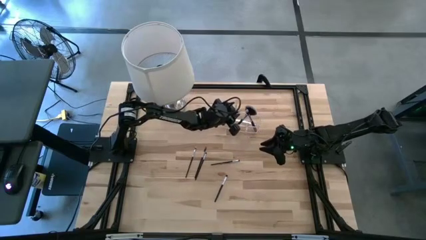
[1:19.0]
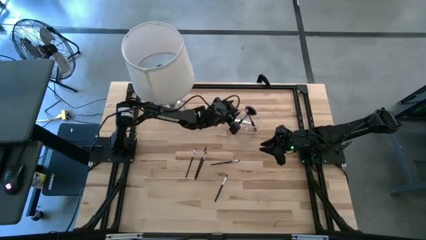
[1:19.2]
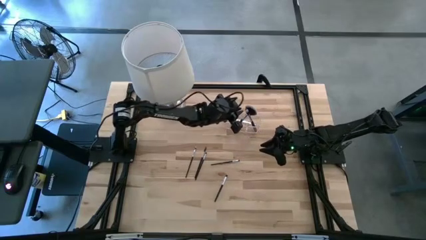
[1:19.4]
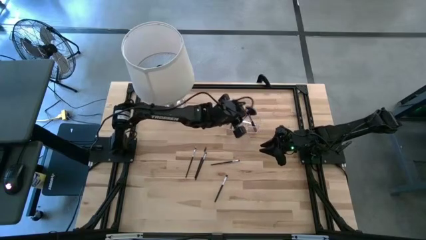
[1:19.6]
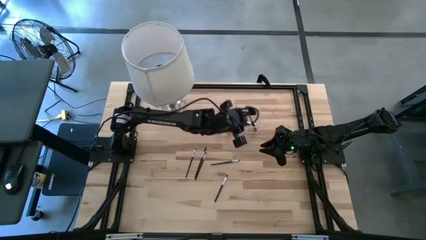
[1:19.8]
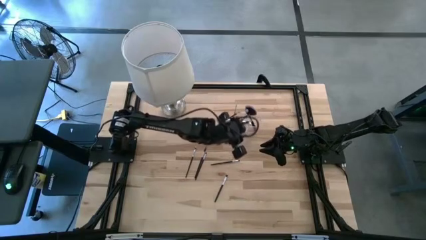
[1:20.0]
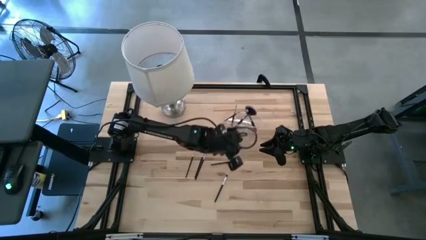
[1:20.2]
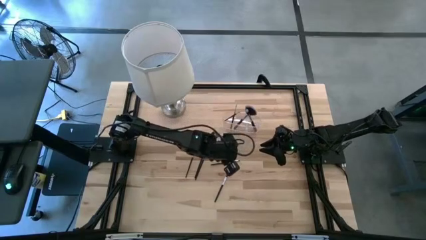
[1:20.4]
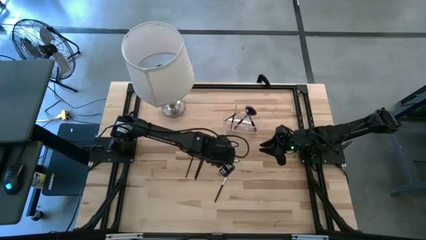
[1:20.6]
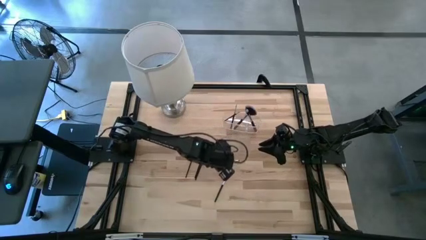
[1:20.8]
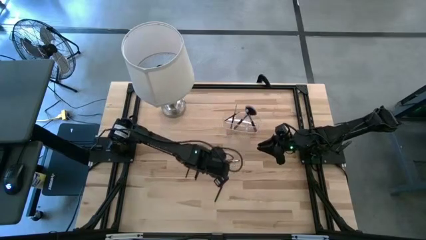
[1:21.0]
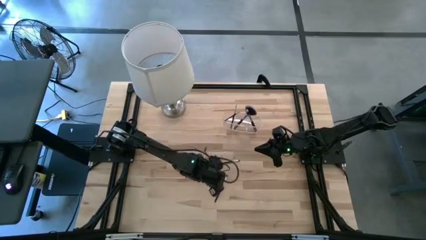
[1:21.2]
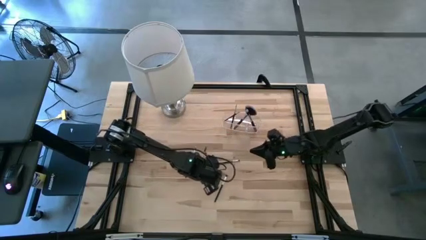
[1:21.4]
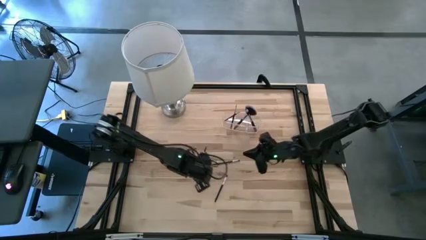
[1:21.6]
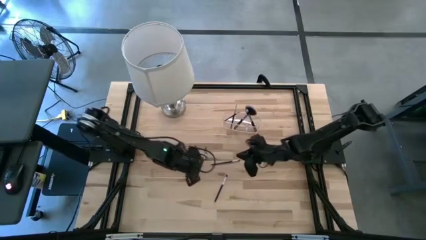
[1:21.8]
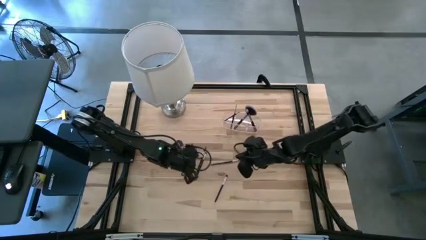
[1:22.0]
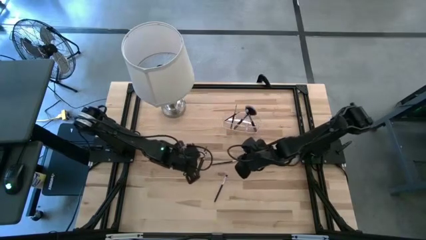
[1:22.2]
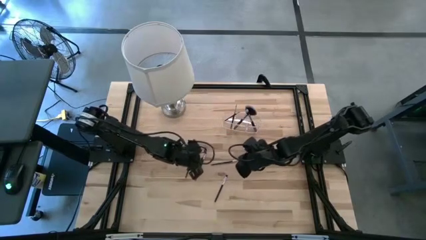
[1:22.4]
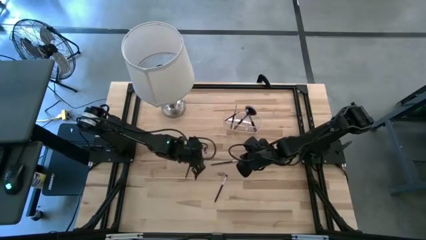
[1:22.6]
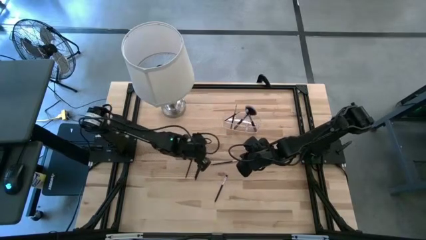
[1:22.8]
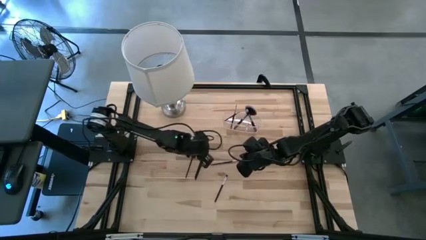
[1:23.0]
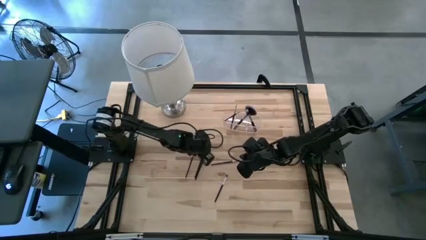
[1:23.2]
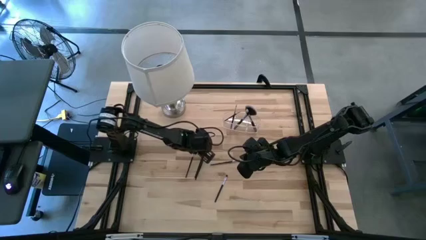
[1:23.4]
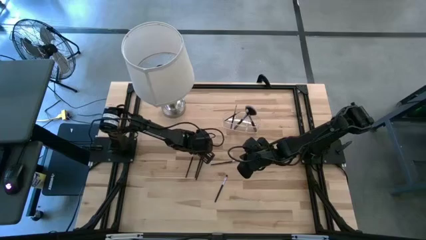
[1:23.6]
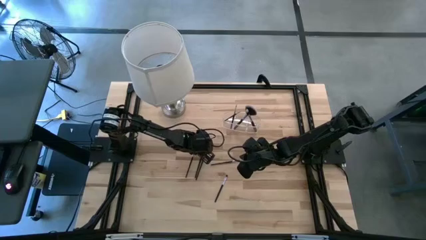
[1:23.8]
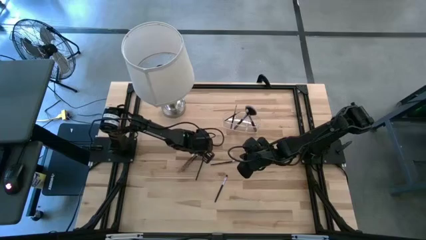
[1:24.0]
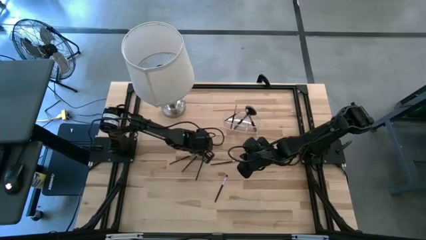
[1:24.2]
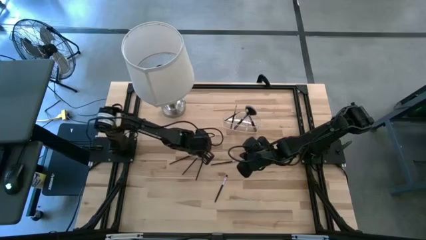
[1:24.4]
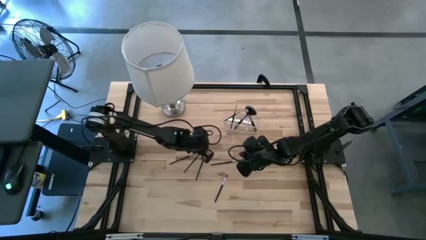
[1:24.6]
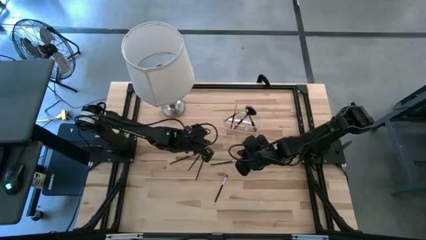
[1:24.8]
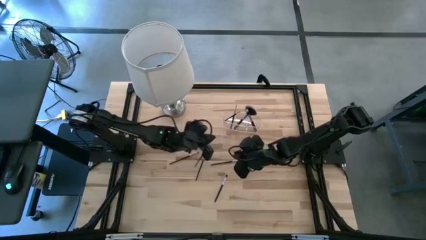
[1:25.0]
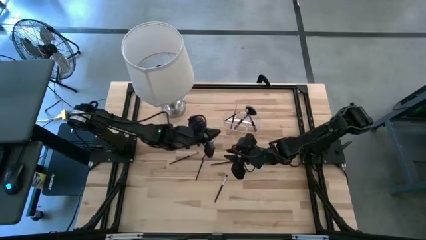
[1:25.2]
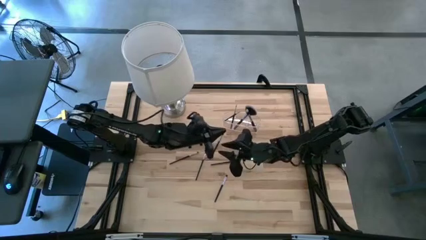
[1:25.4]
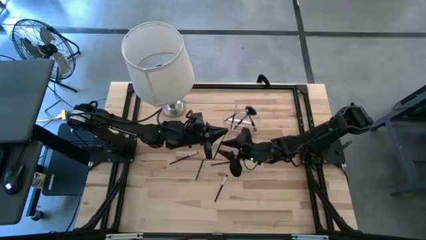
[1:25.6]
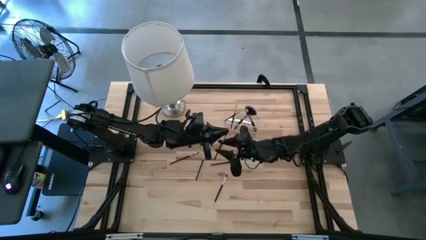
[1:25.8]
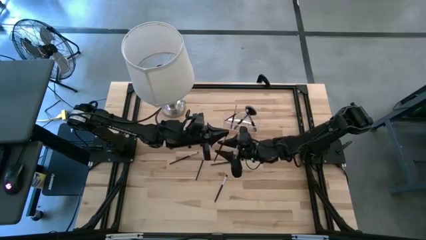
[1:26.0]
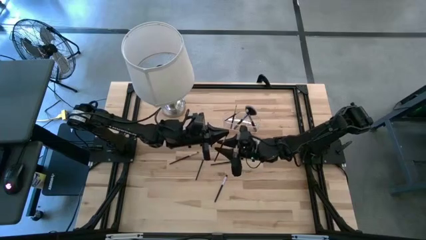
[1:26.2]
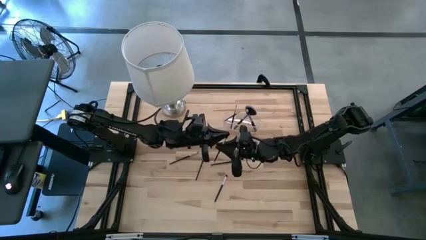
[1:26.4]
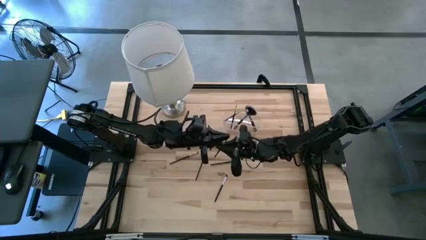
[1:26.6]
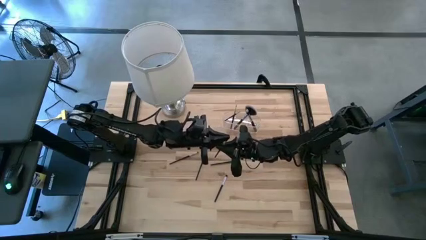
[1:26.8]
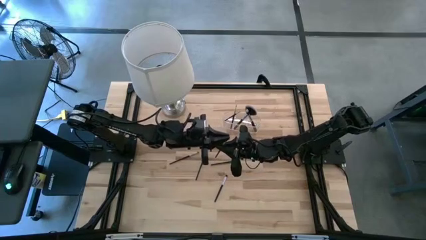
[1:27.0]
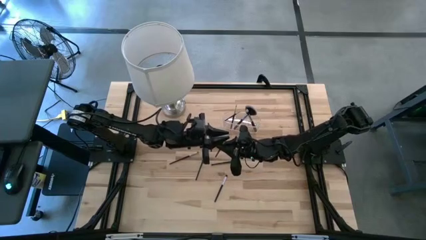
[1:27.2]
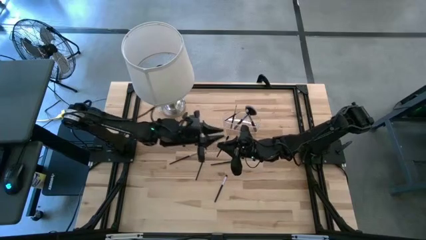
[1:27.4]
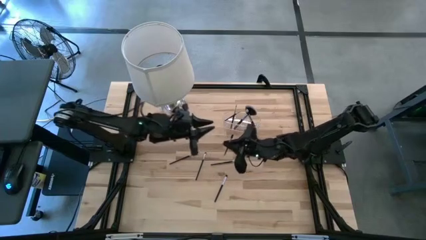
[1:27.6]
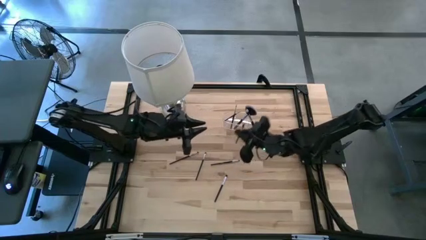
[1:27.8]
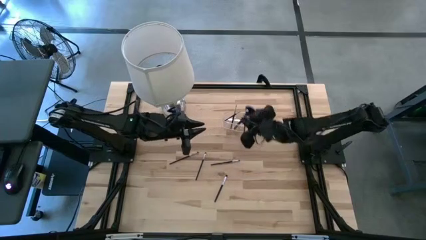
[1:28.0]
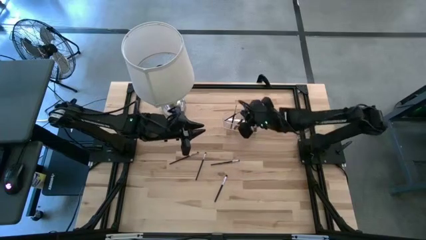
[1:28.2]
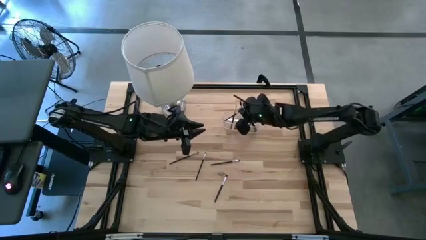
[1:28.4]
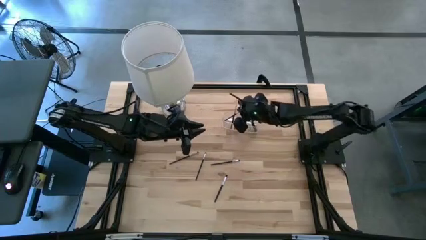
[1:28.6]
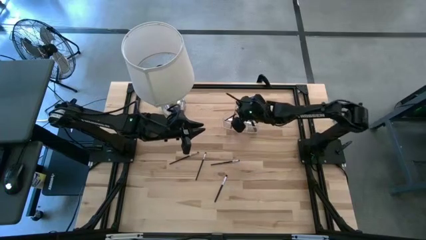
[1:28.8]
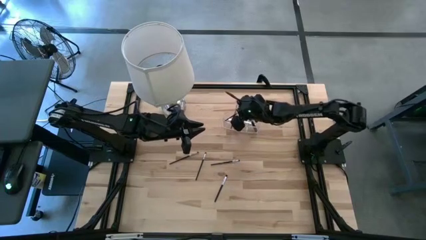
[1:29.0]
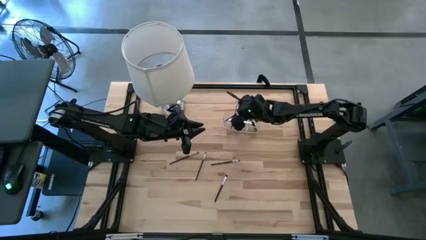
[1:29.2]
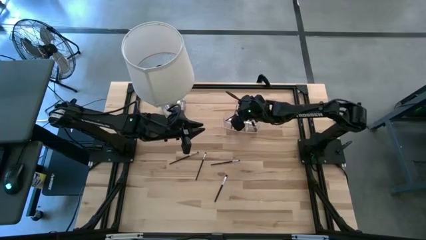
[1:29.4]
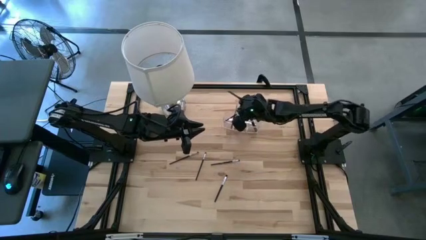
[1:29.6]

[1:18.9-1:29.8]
Task: Pick & Place Makeup Supplies
Put the makeup brush into the transparent organizer
